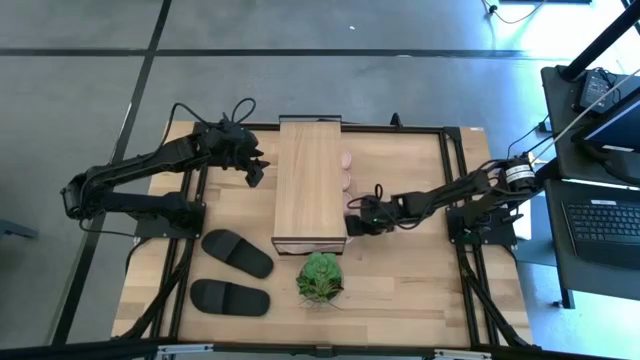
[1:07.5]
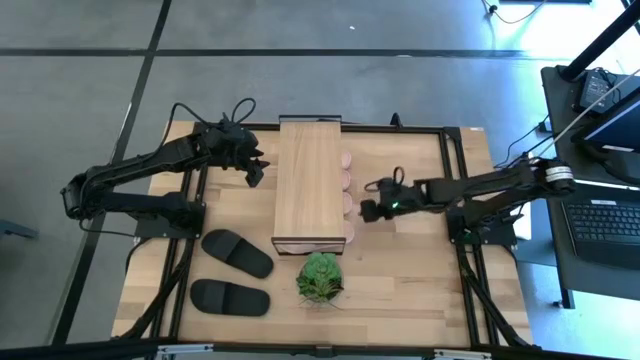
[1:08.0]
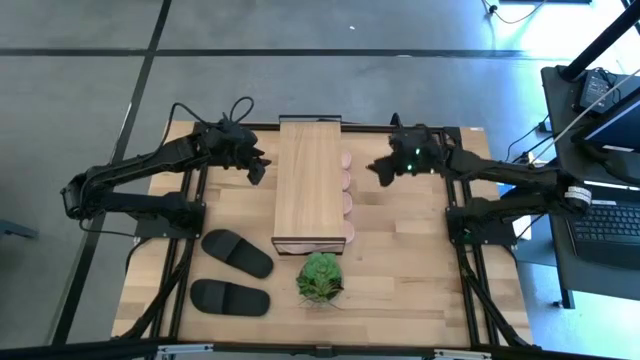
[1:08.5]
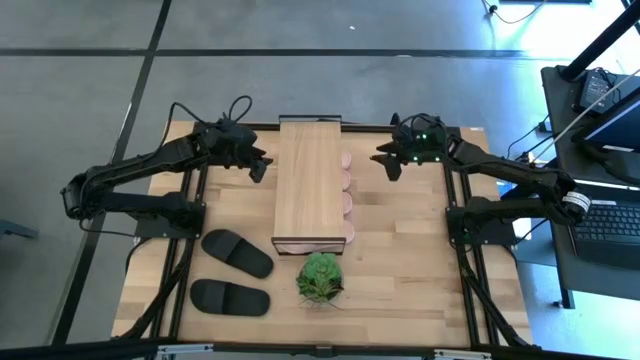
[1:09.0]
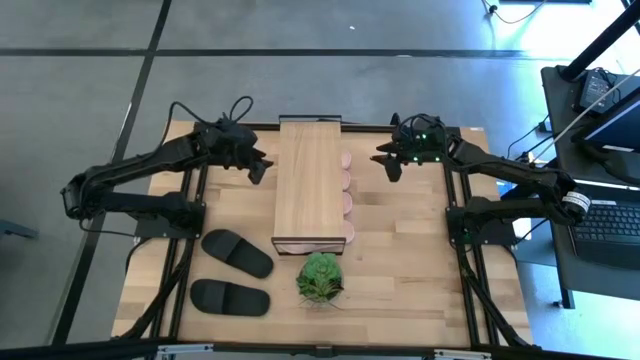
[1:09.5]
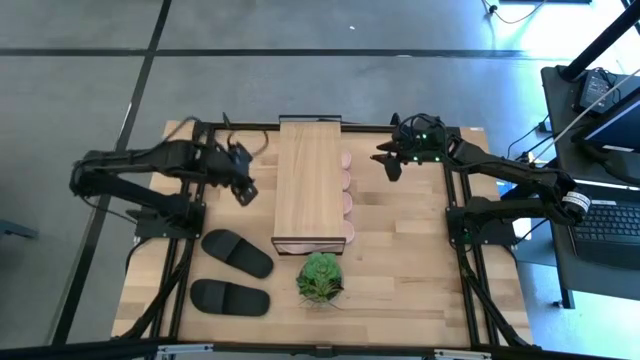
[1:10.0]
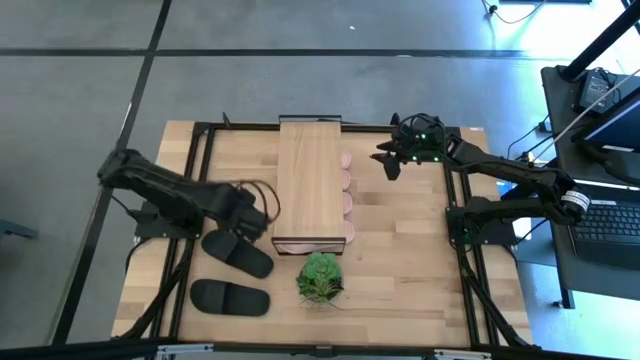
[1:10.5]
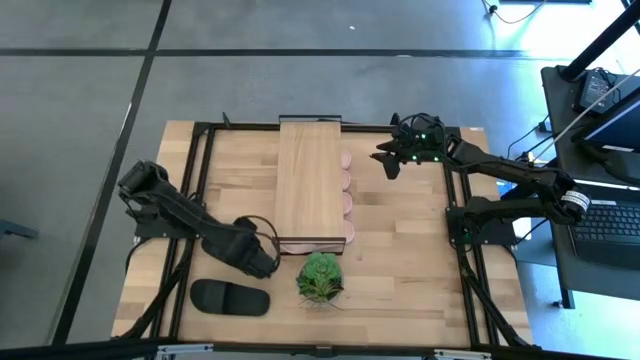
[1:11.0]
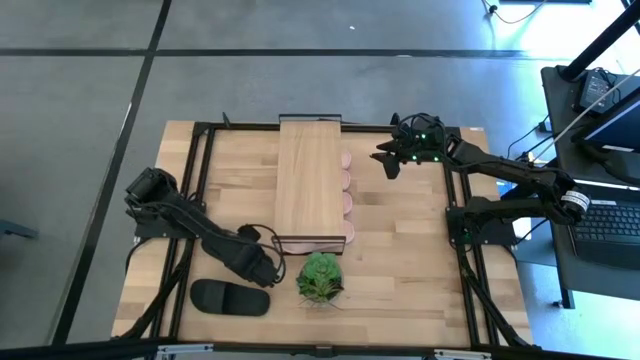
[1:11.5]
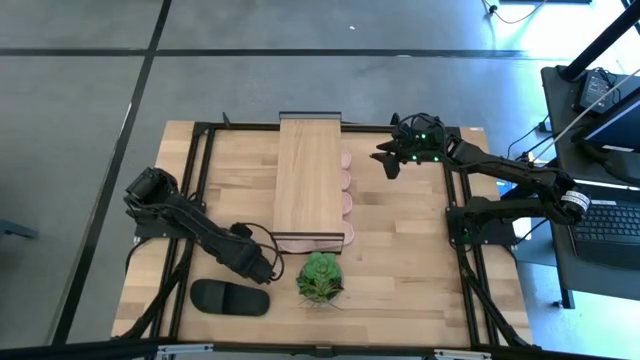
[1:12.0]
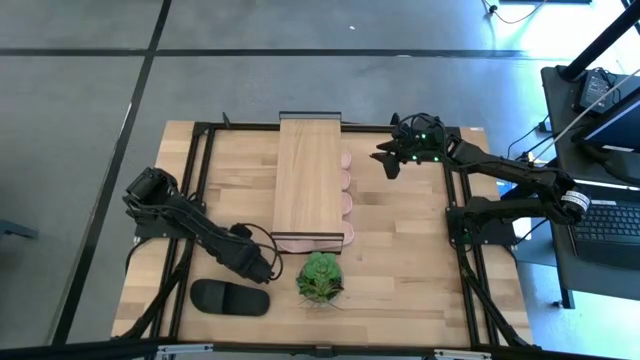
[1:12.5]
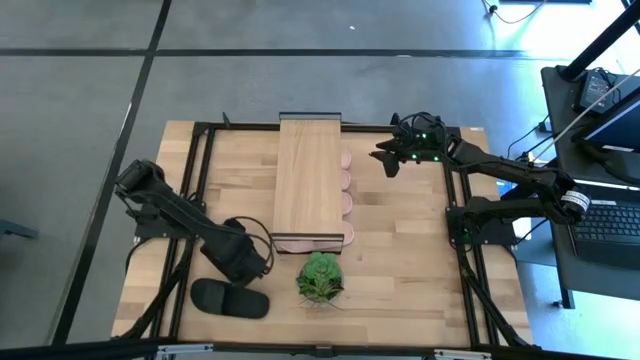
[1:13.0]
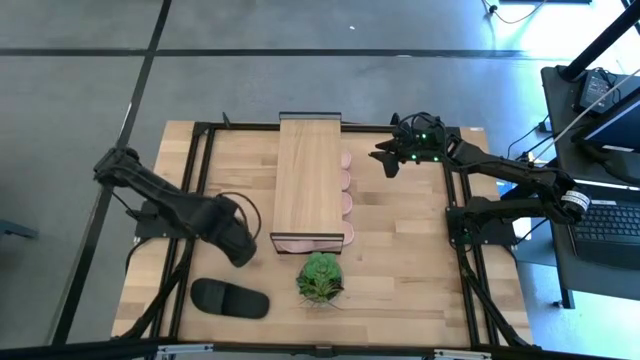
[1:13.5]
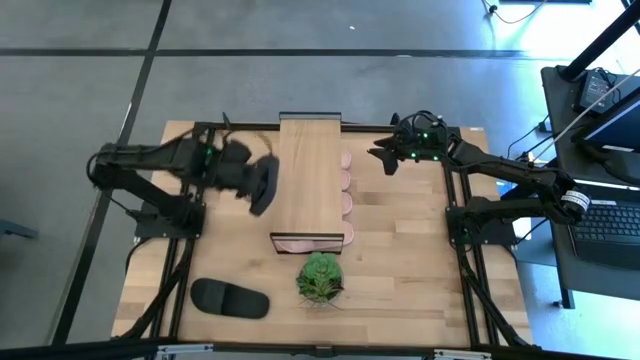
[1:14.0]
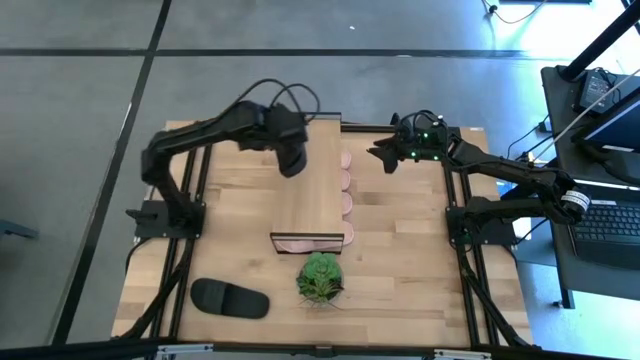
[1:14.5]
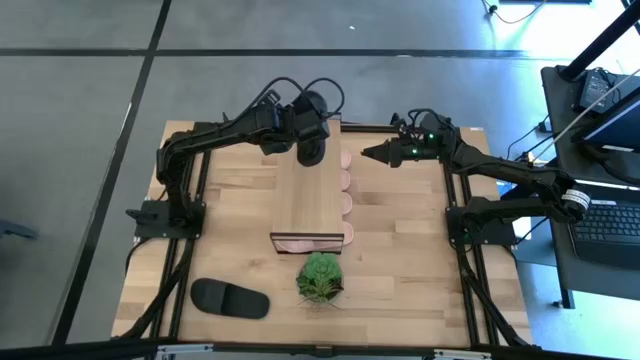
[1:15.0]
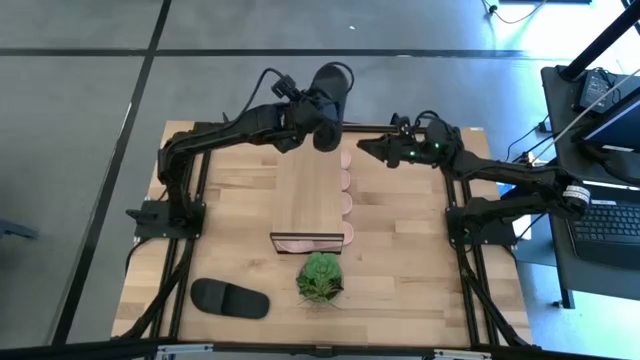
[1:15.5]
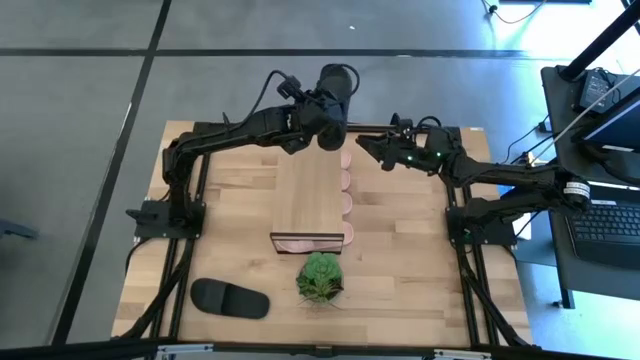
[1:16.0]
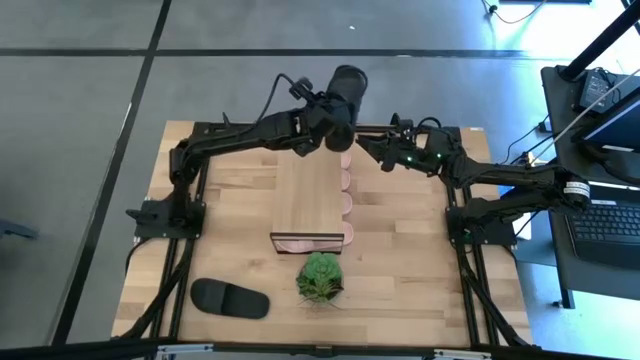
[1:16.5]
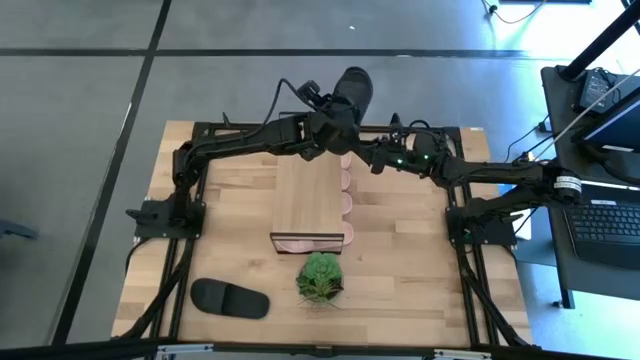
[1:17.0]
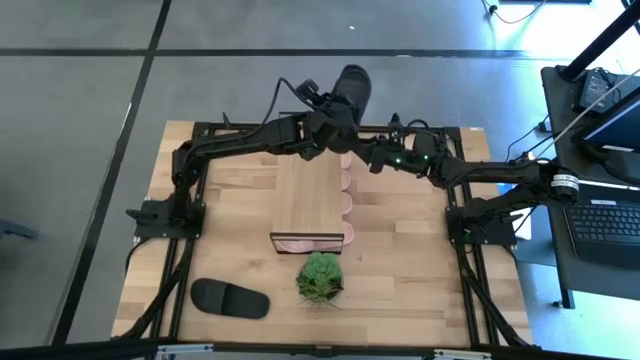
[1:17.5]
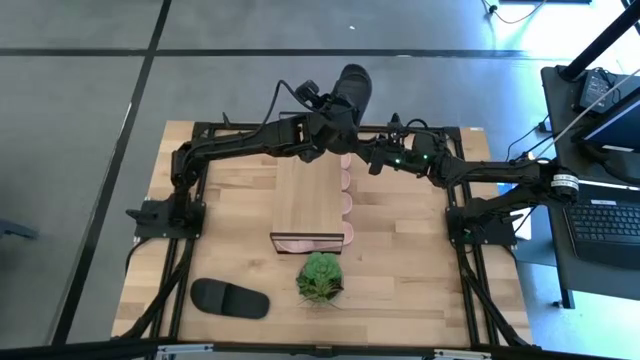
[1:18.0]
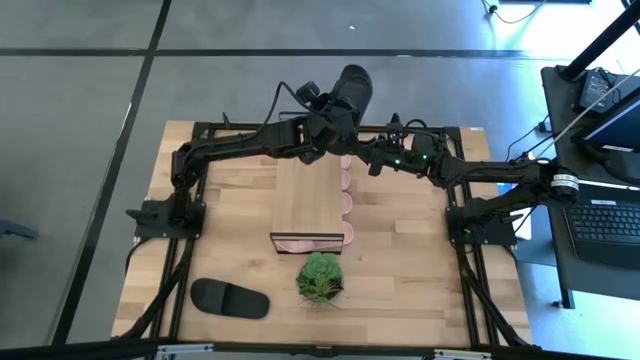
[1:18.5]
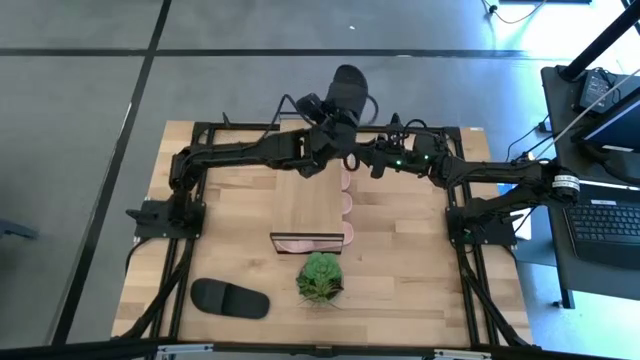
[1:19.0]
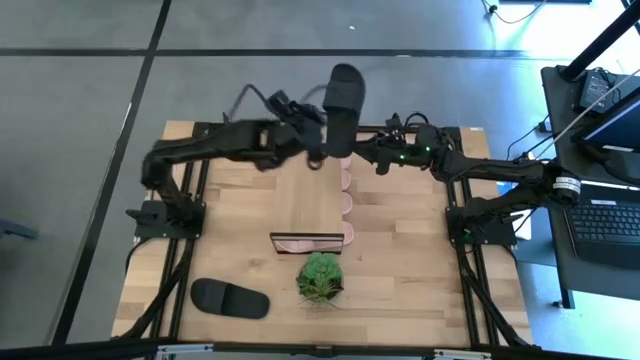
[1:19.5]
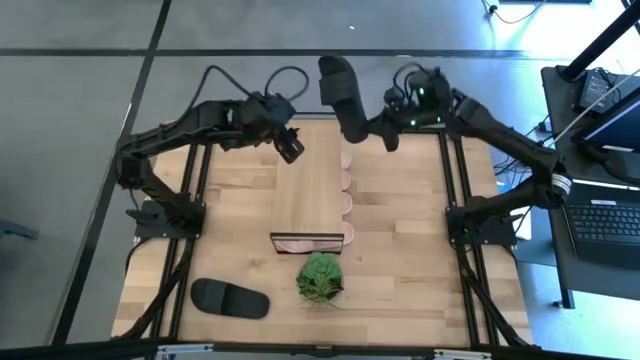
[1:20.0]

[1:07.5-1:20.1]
Task: Pick and place slides into the shelf
Put the black slipper on the shelf

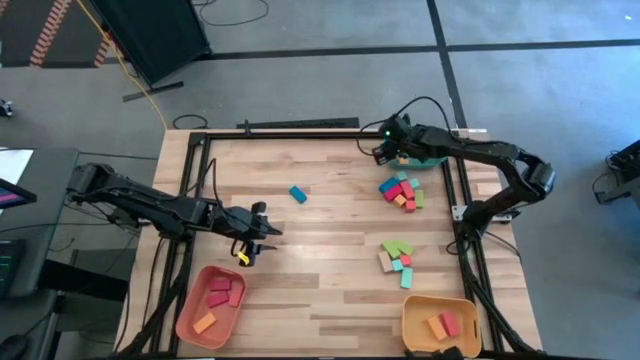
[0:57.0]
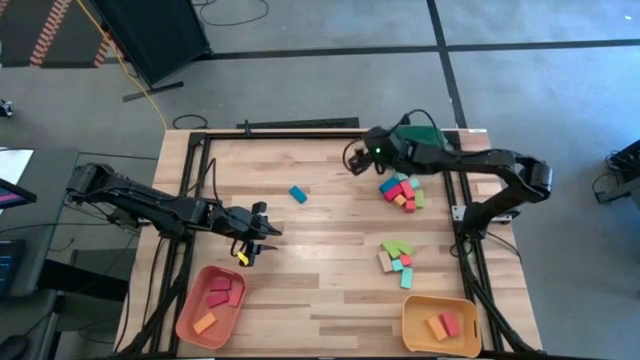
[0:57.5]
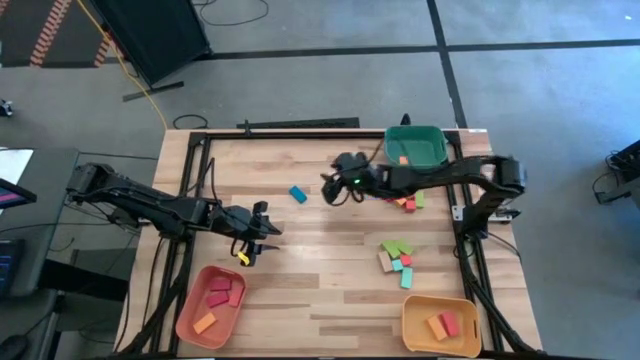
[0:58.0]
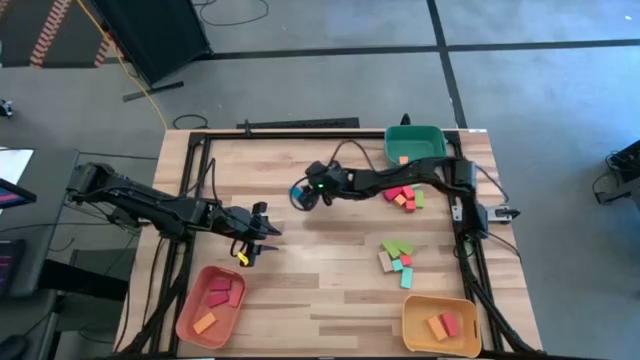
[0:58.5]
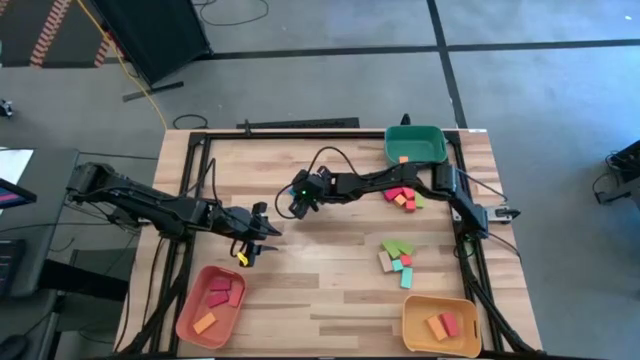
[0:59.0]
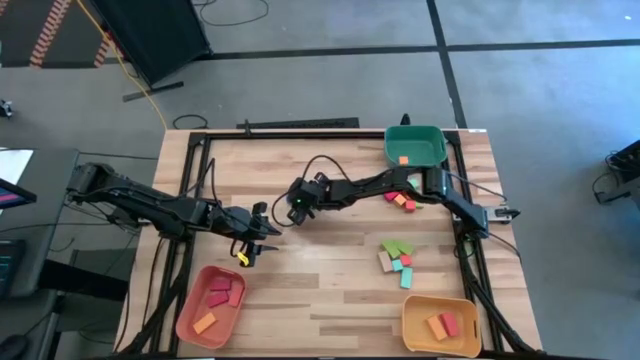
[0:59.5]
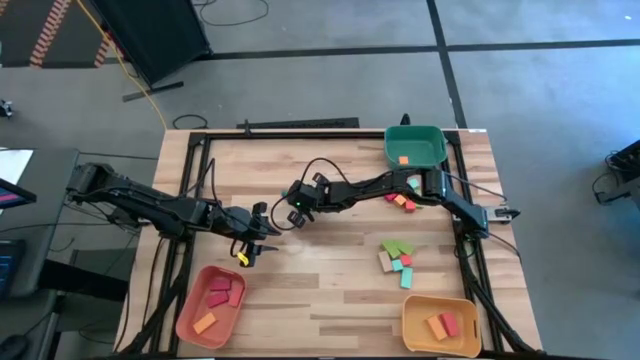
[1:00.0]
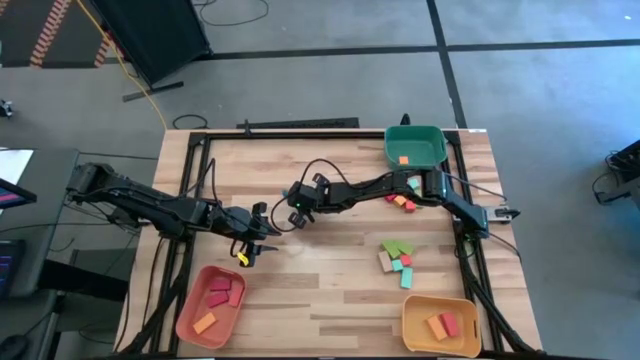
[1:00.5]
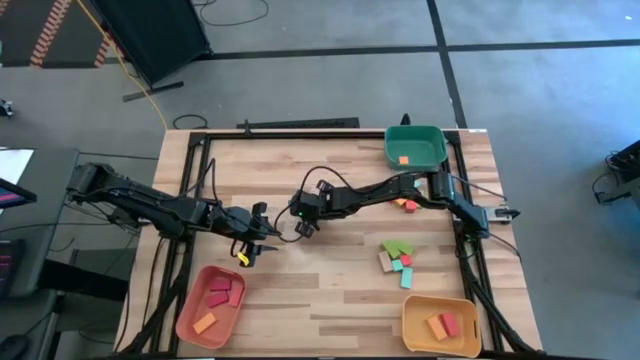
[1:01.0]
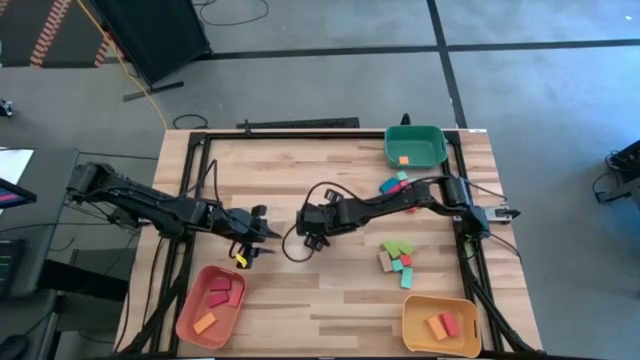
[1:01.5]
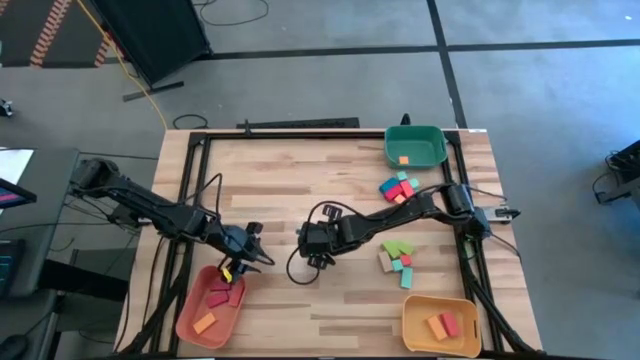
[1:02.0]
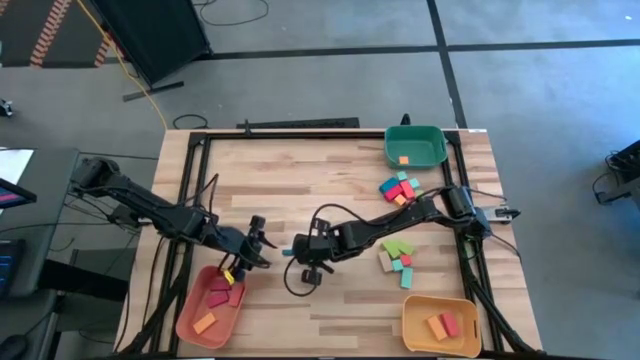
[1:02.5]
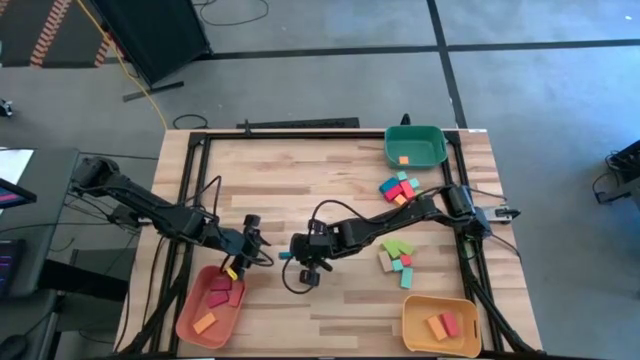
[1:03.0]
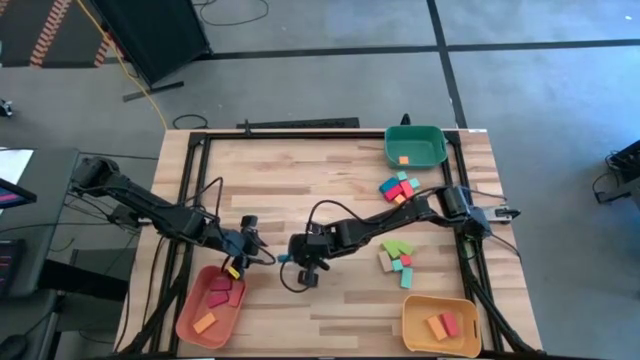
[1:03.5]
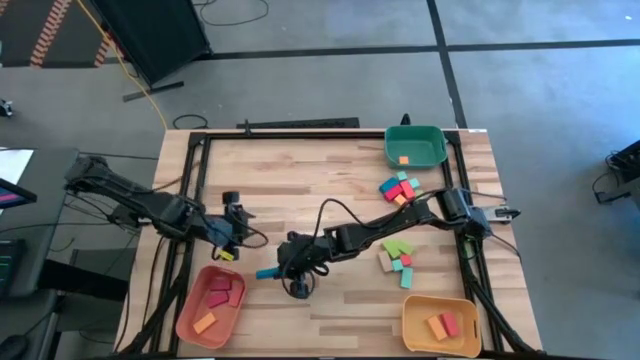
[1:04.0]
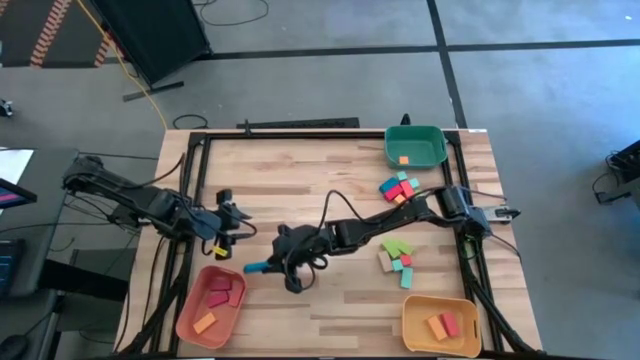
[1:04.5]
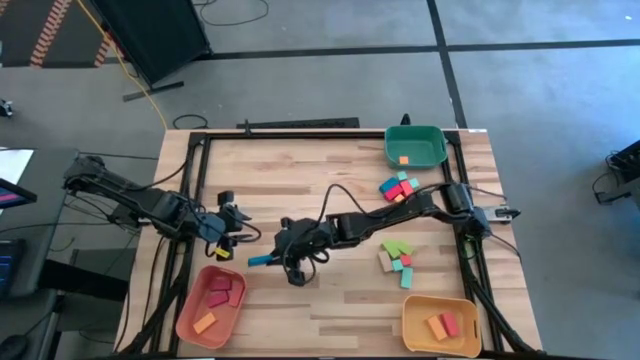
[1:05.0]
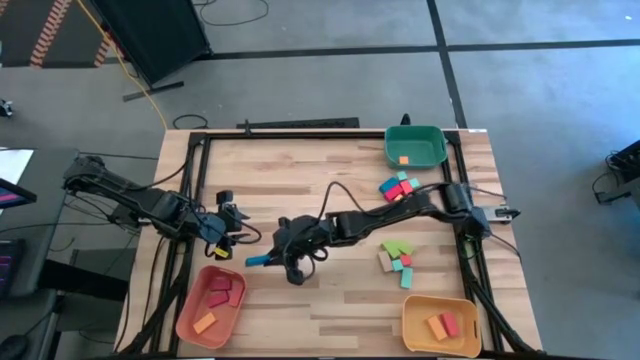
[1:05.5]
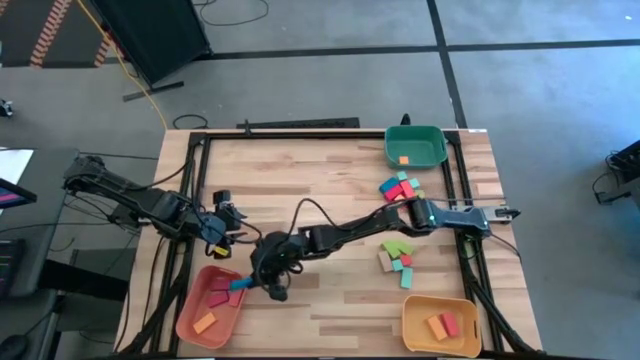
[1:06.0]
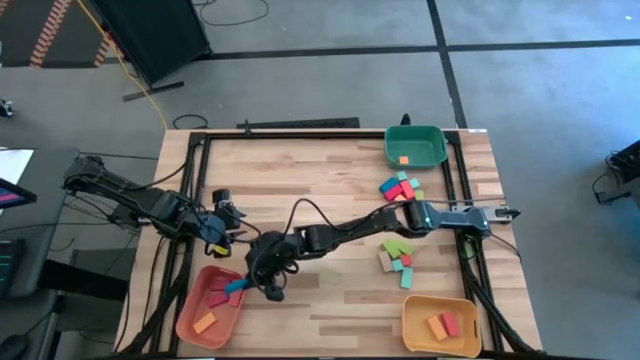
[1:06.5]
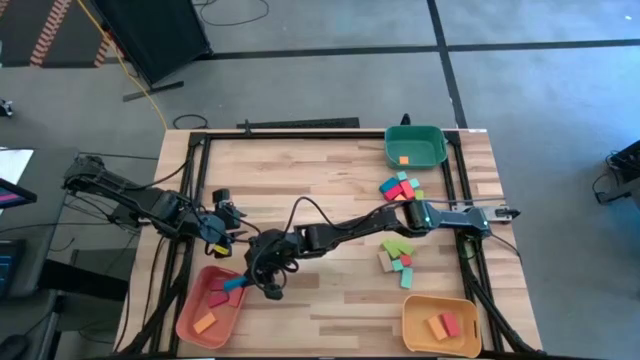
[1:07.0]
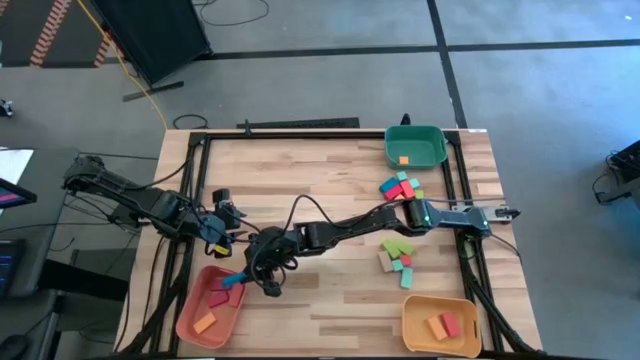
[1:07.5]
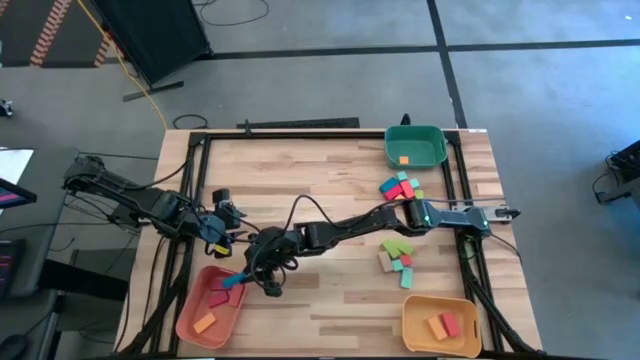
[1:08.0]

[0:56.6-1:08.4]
Task: Sort blocks by size
Put the medium blue rectangular block into the orange bin
